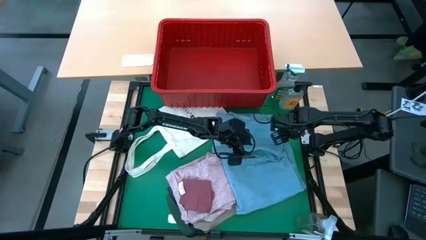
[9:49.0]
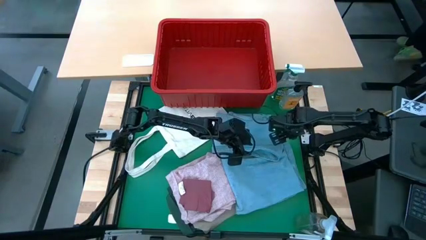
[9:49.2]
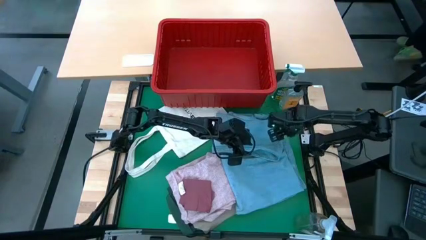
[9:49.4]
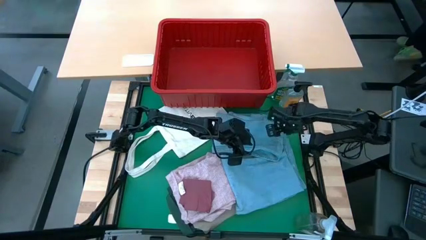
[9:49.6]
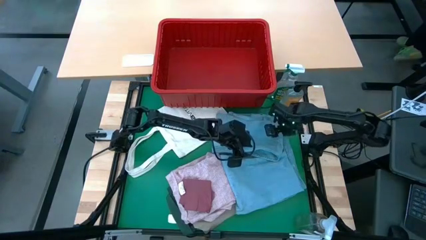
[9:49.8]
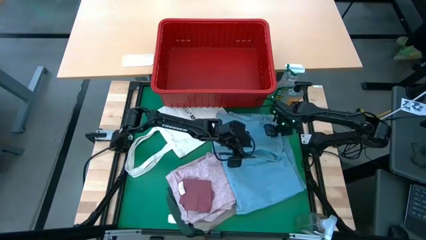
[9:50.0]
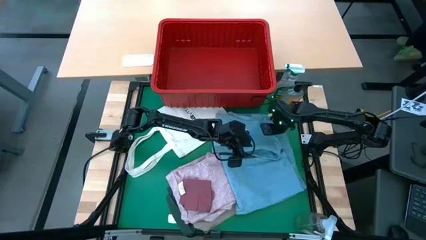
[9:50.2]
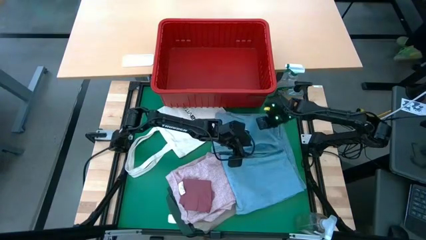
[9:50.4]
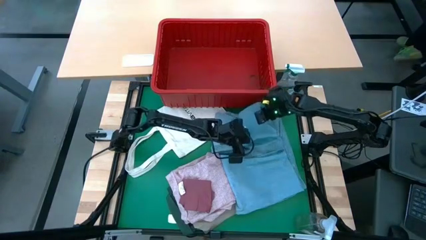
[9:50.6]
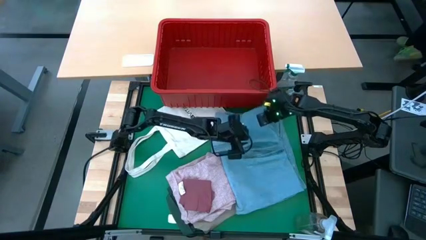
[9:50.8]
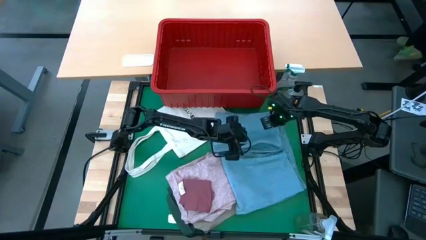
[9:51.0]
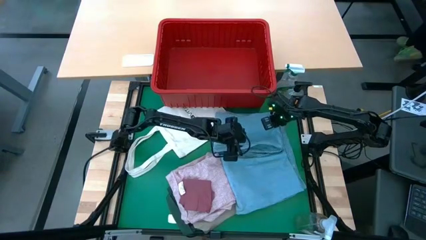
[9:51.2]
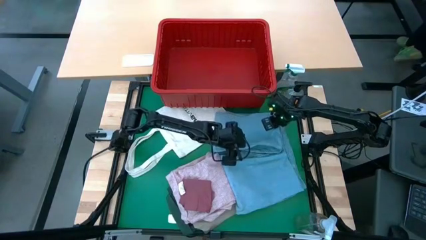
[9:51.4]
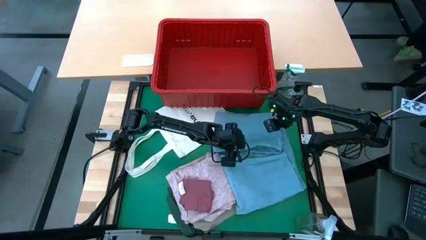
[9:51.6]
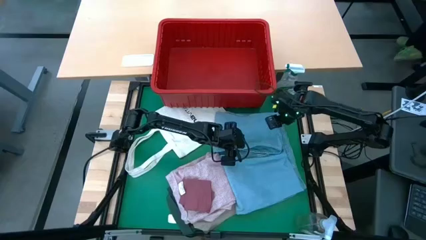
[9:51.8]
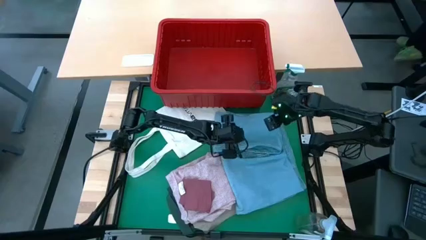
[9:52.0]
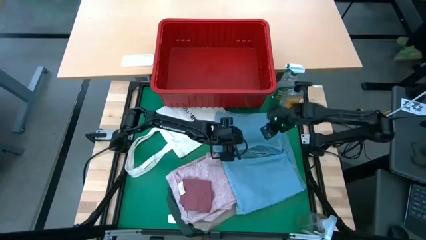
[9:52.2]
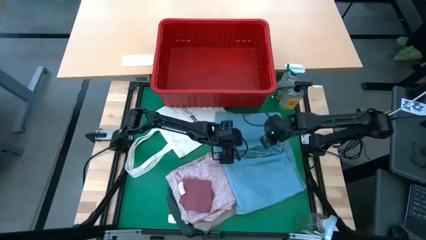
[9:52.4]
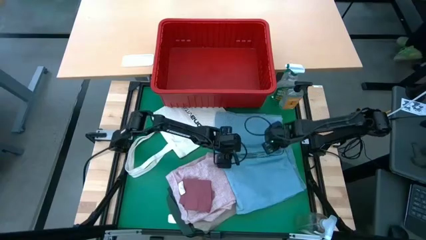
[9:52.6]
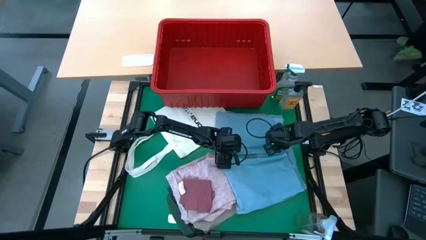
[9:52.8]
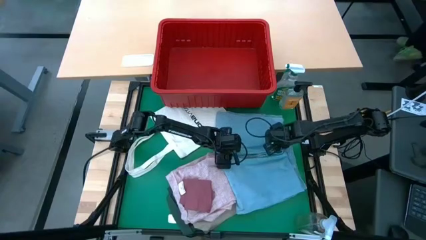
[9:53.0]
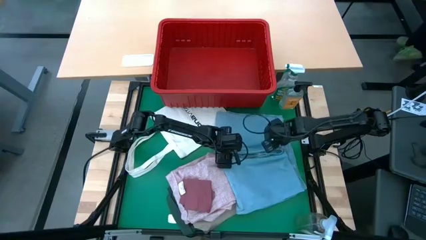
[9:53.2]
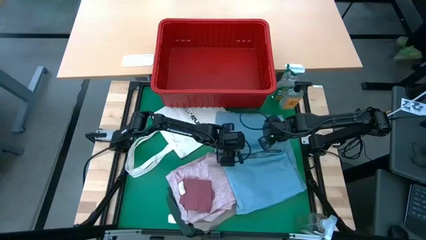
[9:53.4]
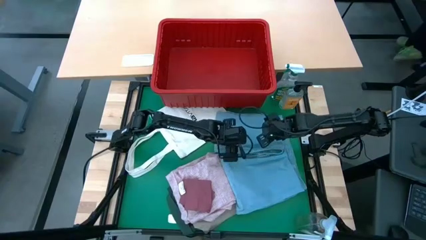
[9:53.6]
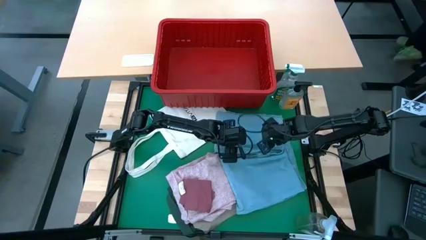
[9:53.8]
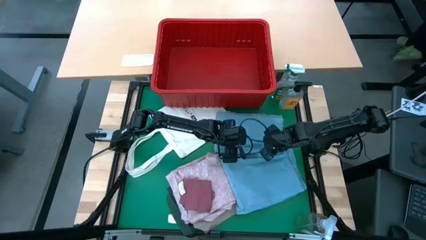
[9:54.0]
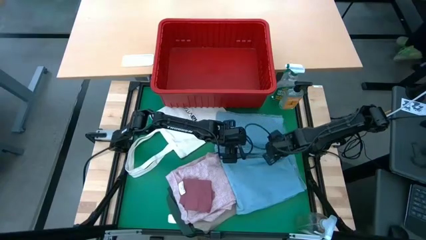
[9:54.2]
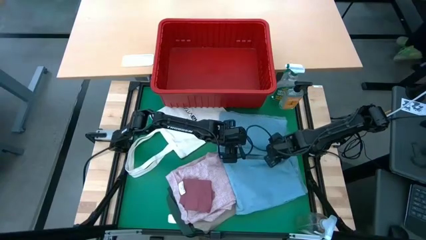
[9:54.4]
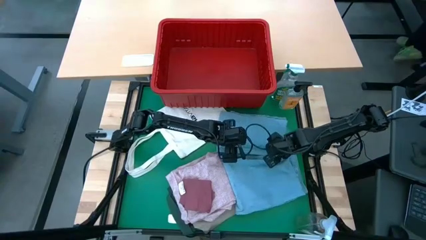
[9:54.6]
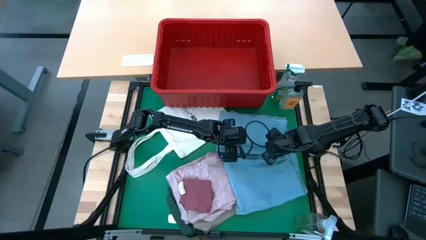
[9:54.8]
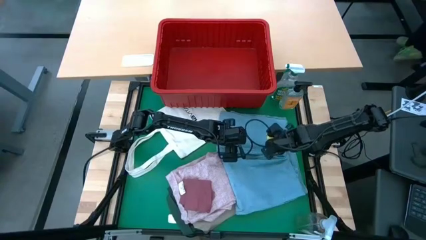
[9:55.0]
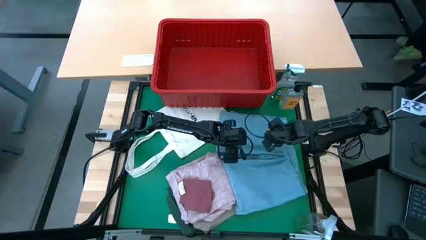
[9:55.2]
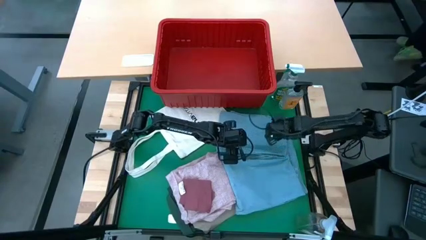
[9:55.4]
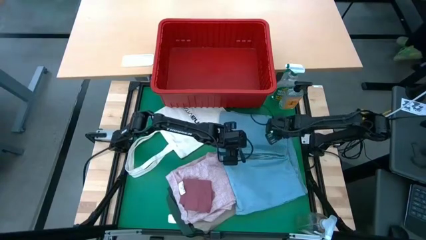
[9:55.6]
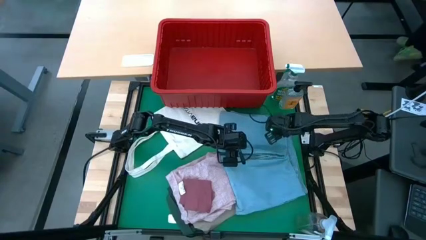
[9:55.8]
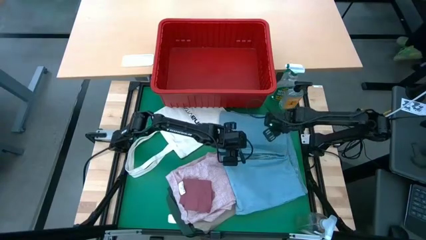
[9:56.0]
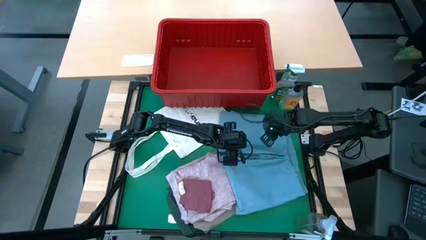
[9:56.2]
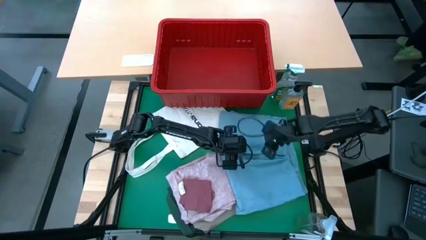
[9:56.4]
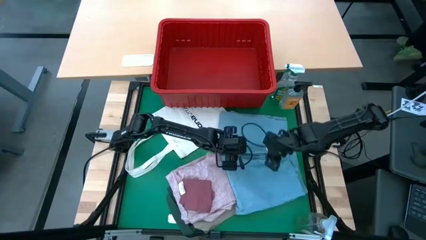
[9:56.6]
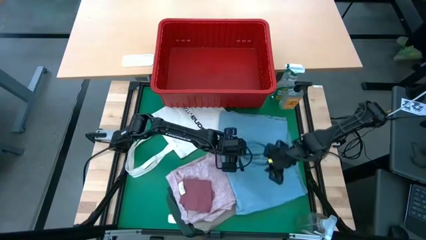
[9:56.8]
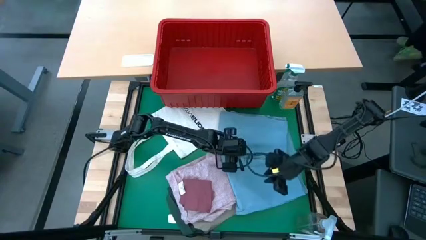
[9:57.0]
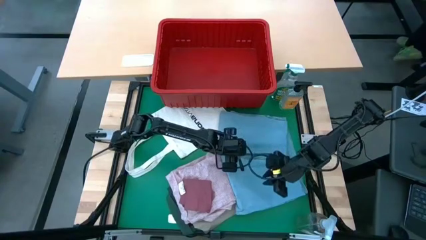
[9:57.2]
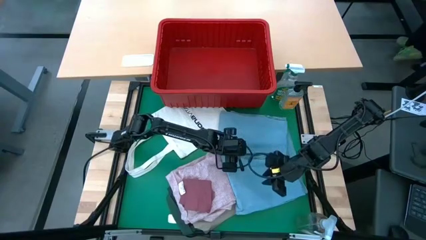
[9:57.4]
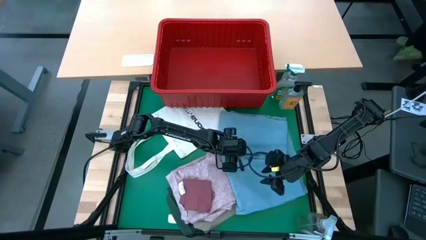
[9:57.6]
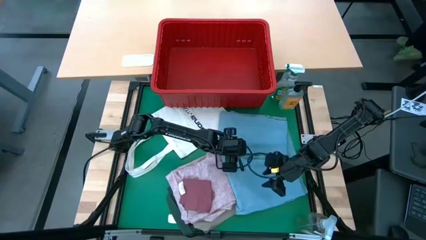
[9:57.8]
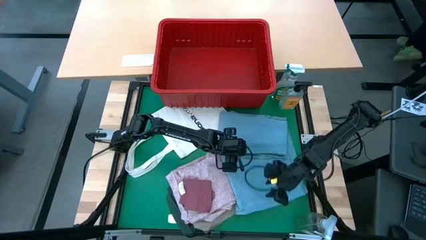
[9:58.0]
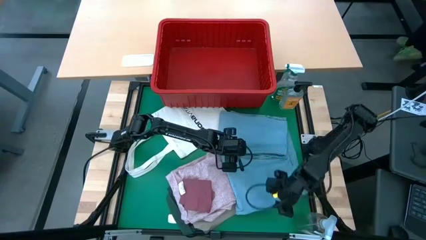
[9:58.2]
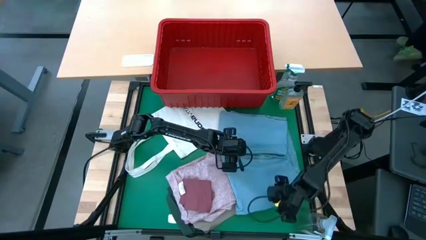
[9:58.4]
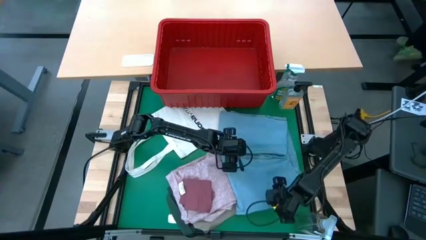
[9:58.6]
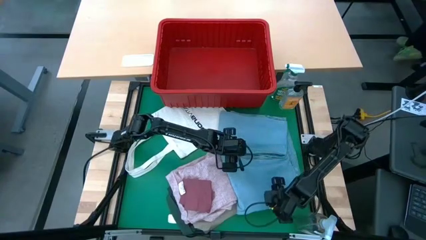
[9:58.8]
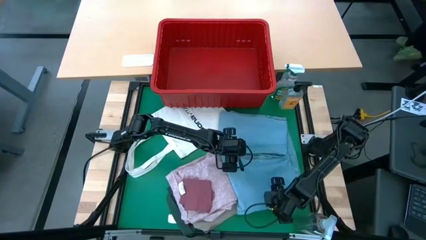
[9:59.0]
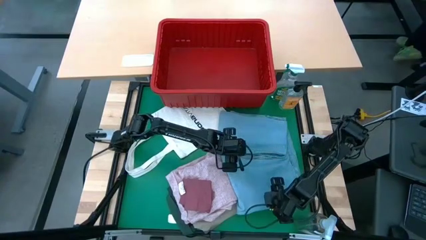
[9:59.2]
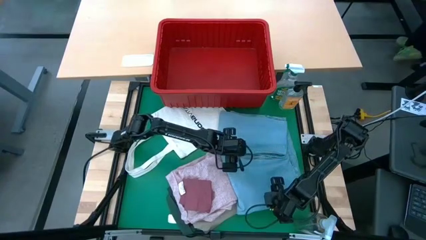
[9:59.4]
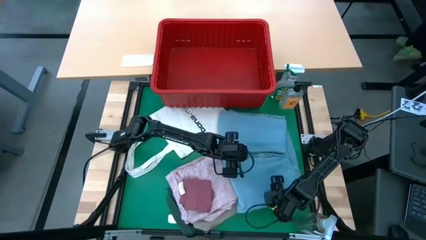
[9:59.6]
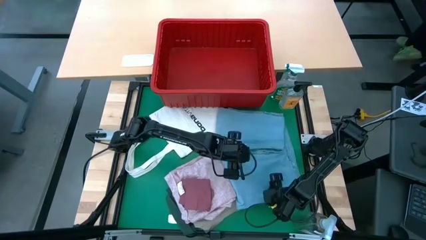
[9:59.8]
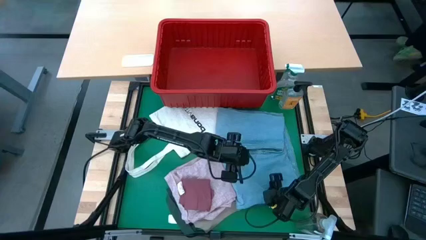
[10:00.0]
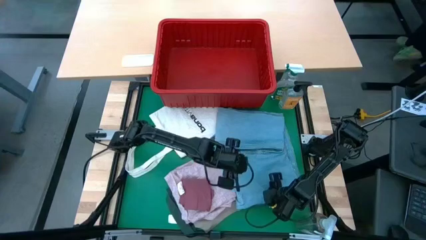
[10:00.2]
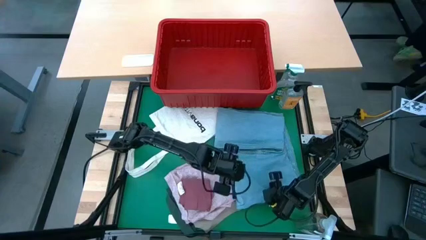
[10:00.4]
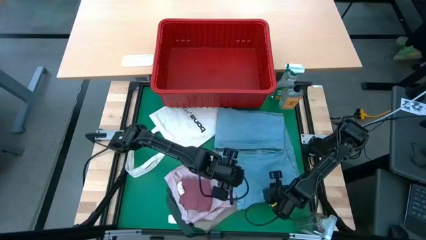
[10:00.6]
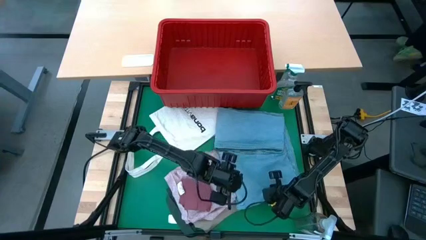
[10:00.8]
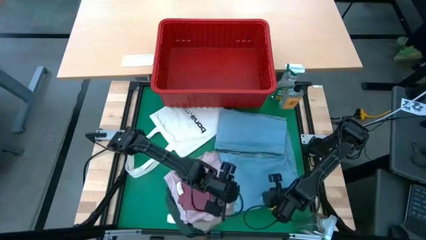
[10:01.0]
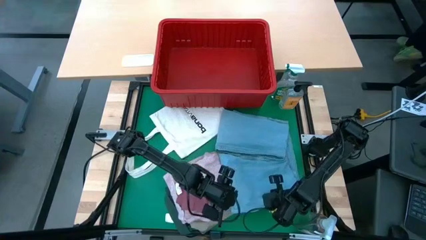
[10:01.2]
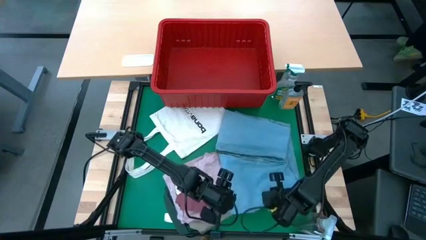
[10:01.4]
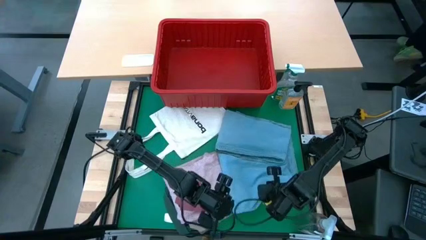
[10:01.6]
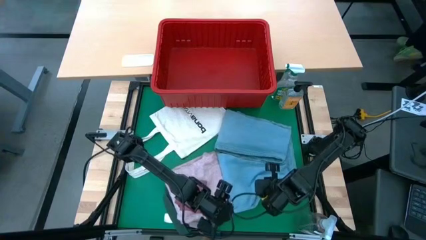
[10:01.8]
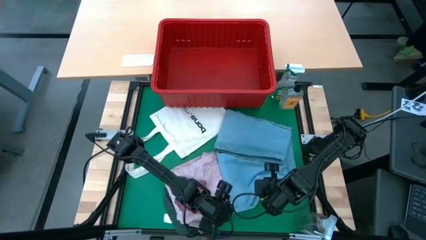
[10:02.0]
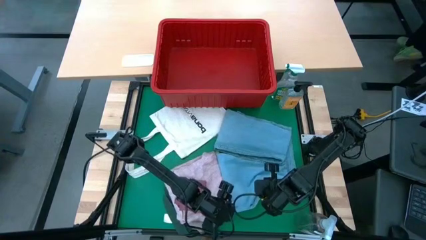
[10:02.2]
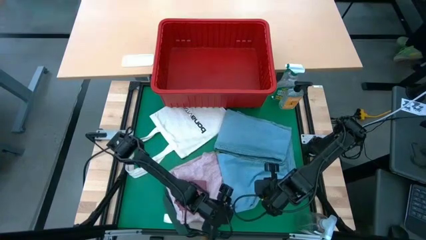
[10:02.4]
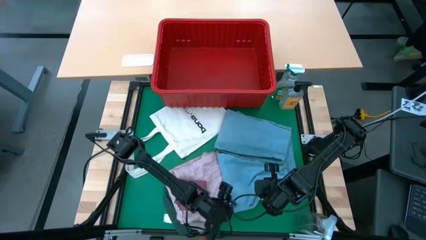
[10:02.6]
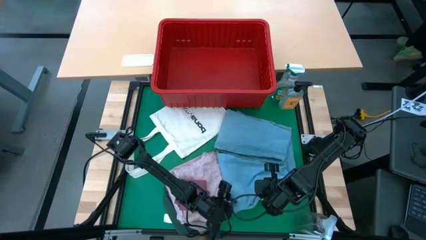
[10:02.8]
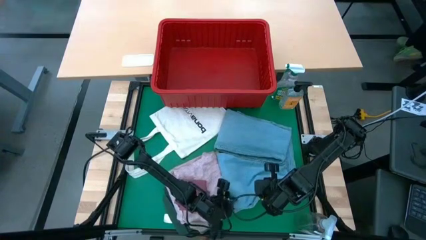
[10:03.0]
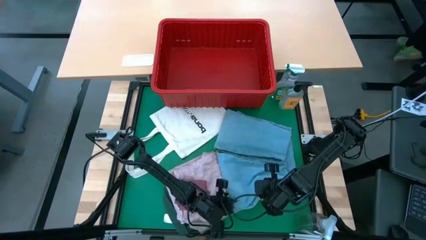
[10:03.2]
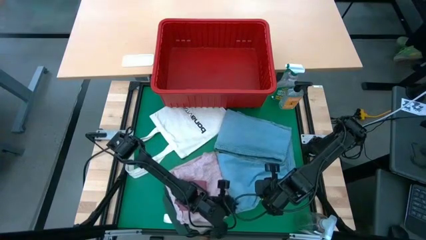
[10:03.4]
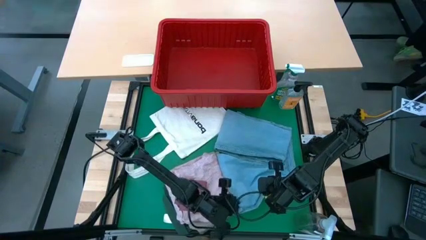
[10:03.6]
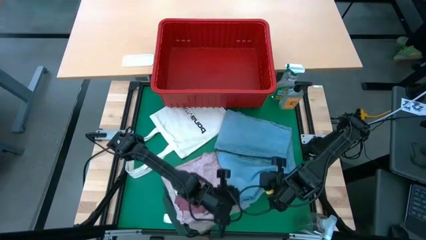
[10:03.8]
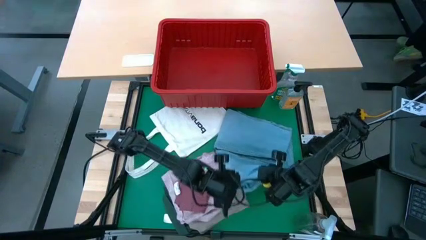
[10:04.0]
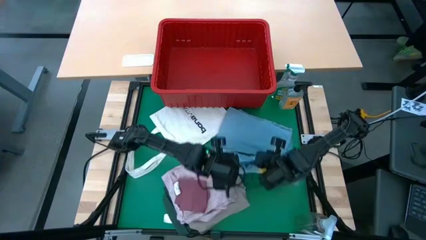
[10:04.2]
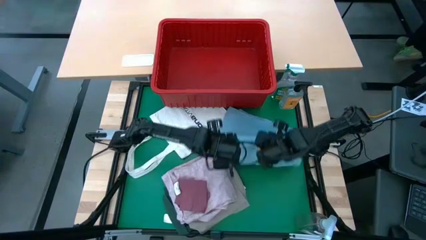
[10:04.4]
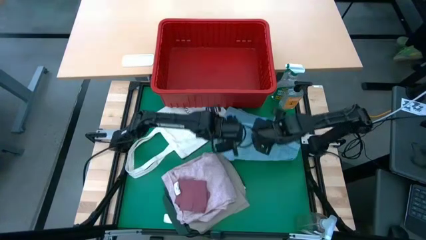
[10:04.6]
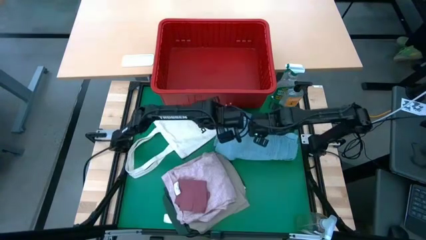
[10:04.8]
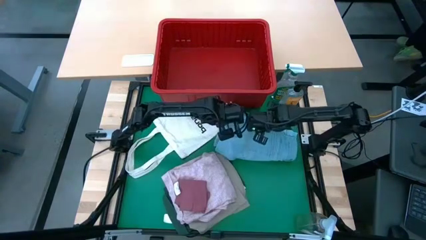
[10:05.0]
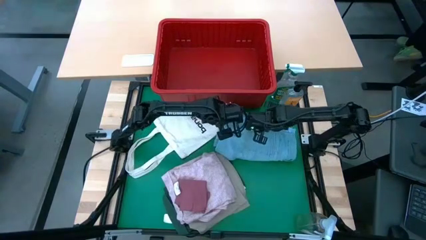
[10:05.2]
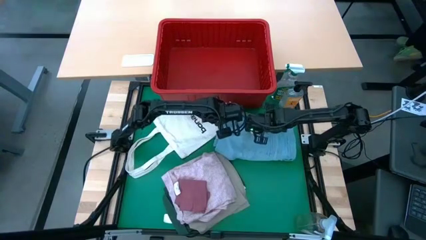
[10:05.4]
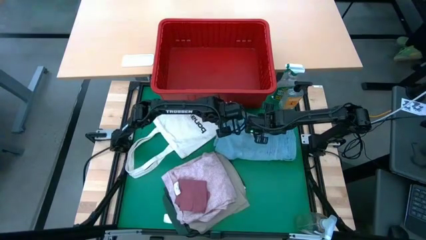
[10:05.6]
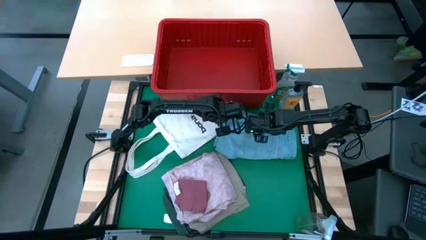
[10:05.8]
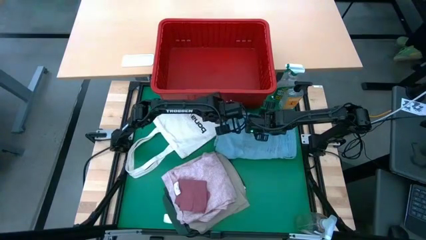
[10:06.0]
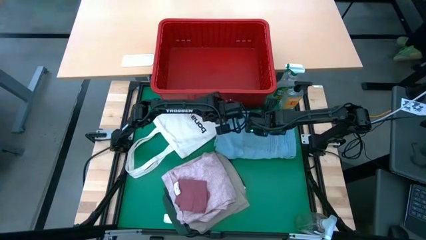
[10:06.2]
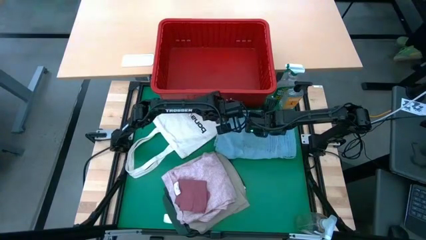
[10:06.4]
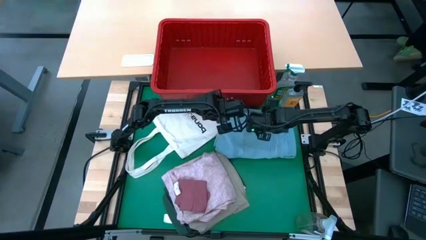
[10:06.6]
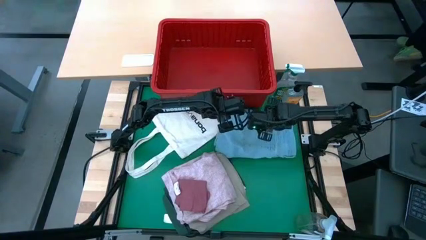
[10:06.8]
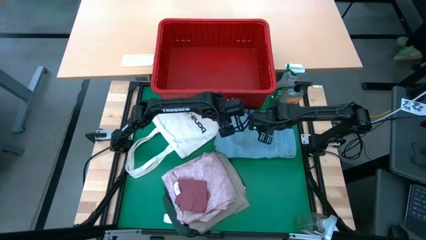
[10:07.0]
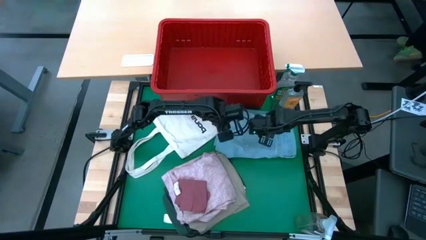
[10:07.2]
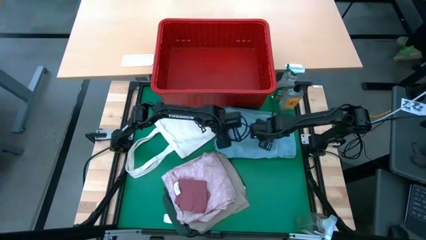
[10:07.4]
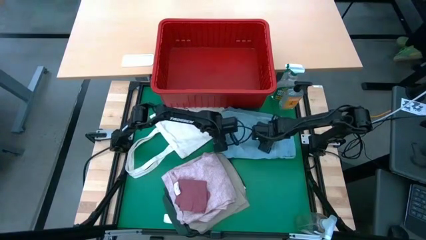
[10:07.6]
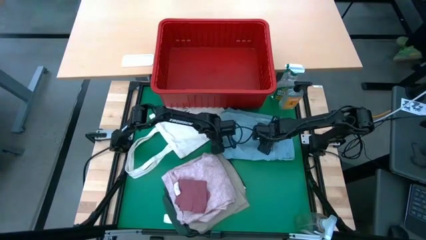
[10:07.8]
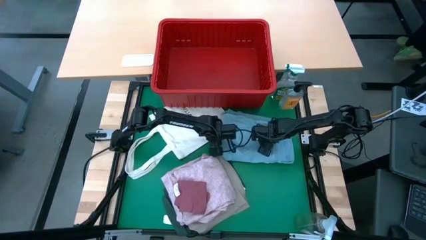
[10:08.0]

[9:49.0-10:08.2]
Task: Fold laundry
Fold the blue jeans
